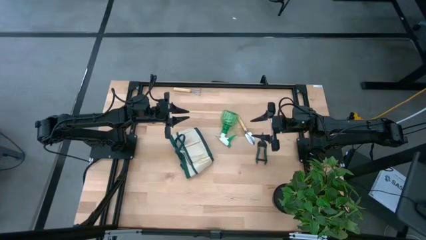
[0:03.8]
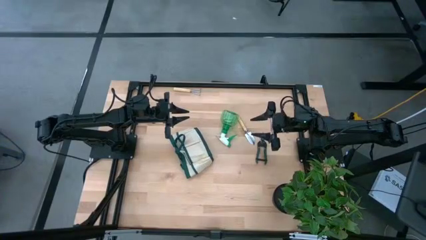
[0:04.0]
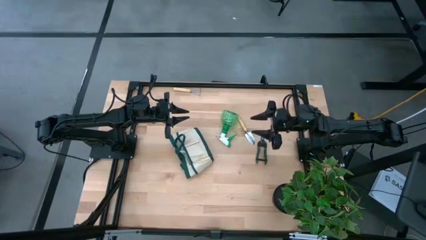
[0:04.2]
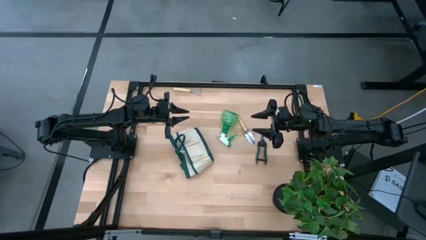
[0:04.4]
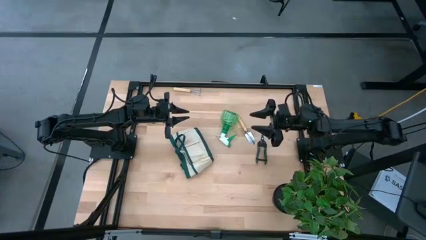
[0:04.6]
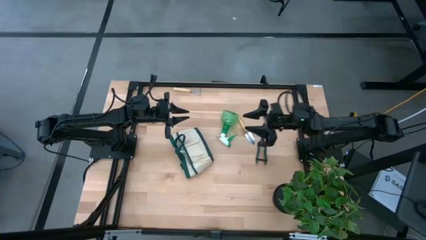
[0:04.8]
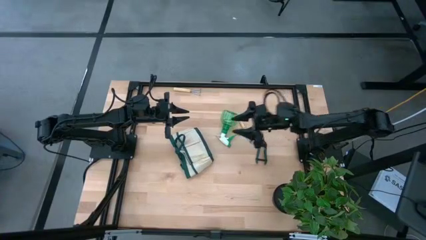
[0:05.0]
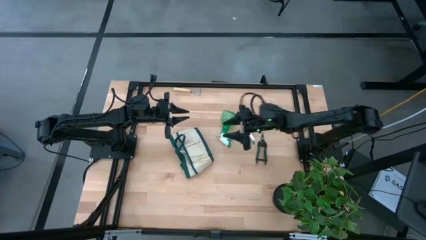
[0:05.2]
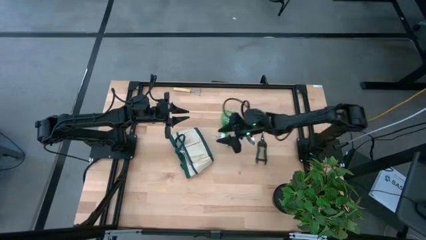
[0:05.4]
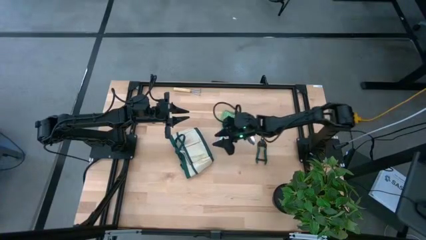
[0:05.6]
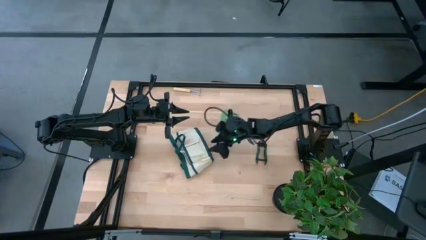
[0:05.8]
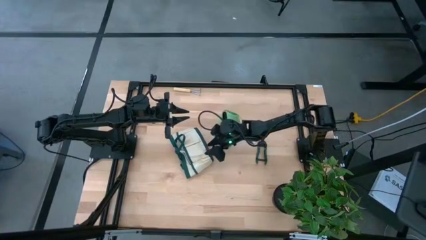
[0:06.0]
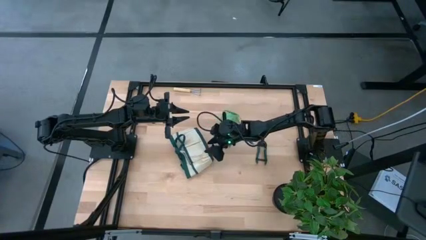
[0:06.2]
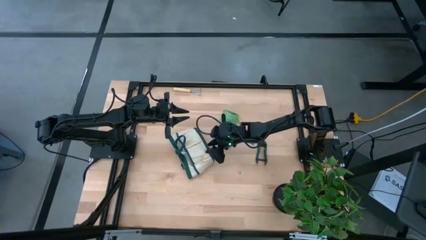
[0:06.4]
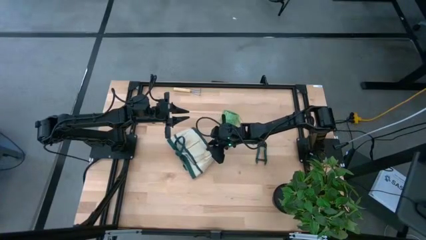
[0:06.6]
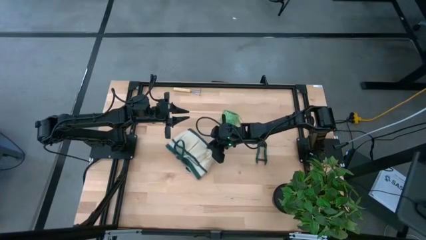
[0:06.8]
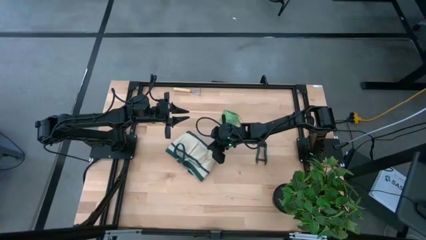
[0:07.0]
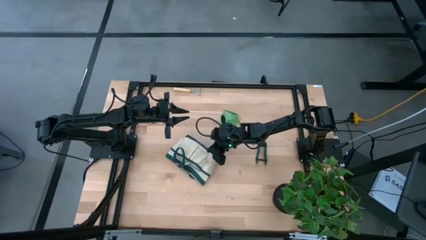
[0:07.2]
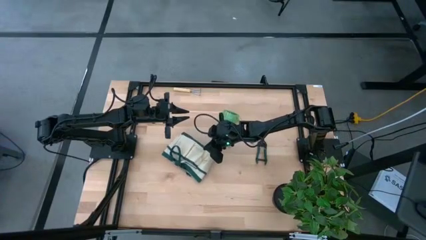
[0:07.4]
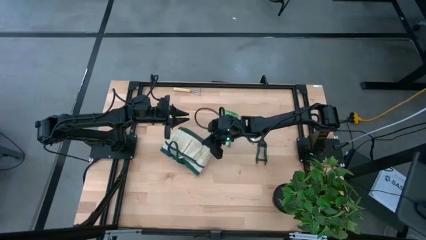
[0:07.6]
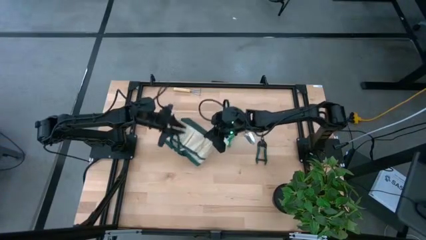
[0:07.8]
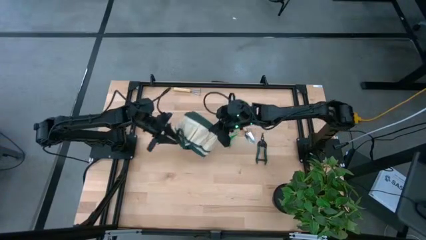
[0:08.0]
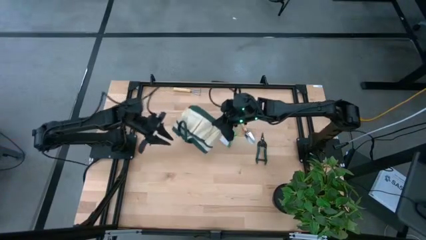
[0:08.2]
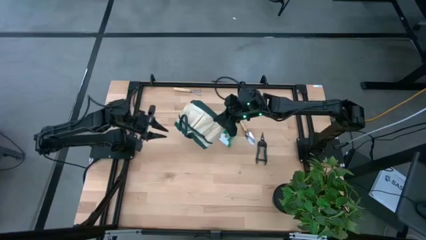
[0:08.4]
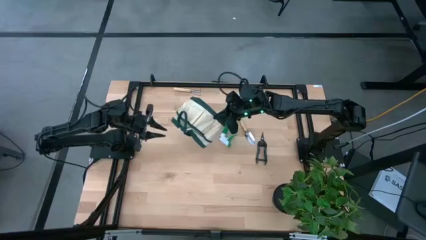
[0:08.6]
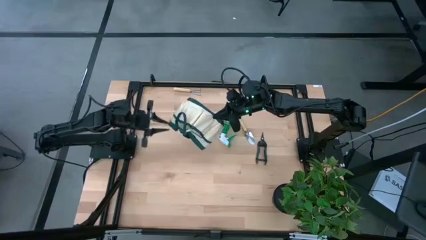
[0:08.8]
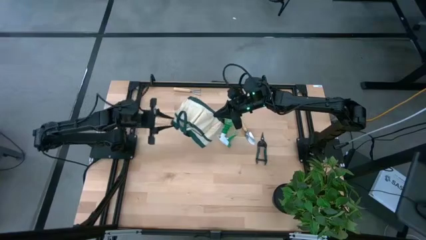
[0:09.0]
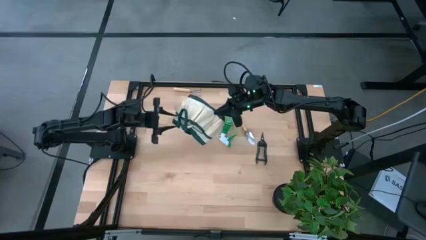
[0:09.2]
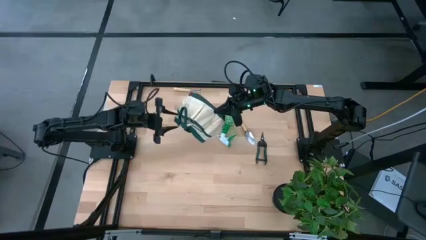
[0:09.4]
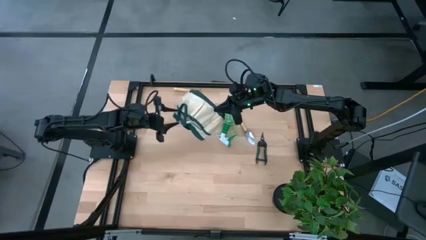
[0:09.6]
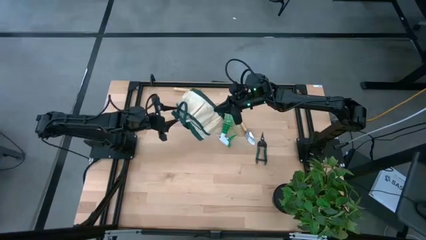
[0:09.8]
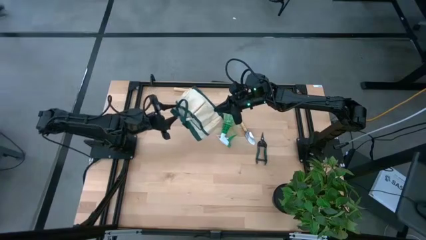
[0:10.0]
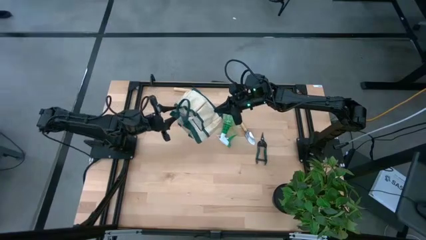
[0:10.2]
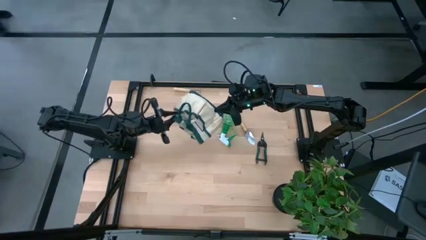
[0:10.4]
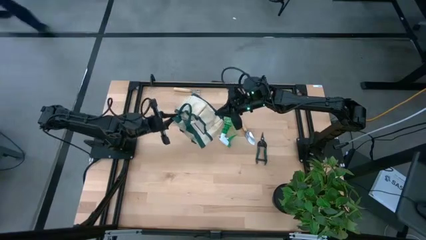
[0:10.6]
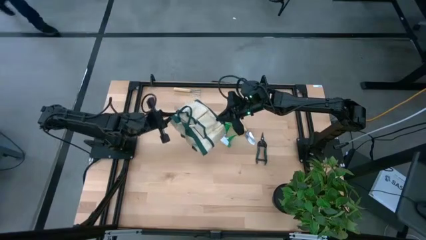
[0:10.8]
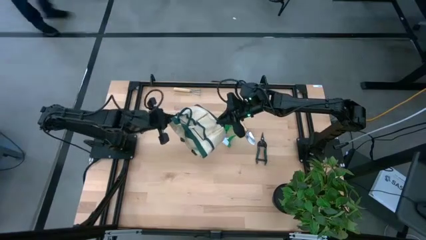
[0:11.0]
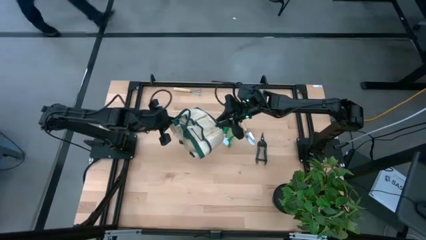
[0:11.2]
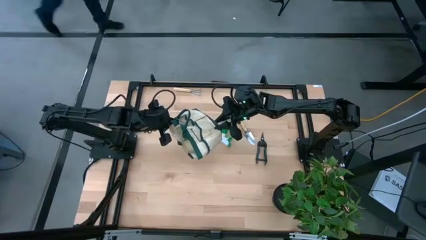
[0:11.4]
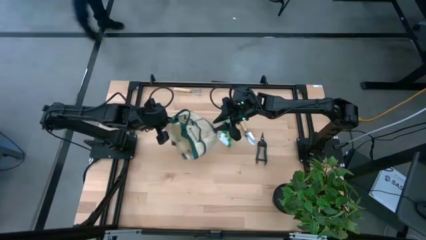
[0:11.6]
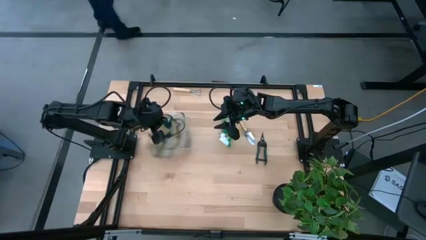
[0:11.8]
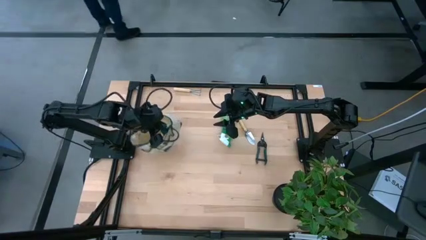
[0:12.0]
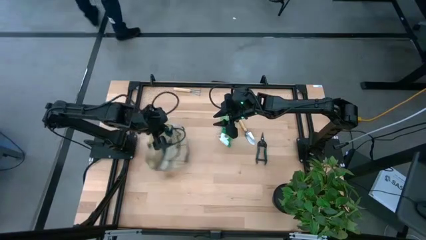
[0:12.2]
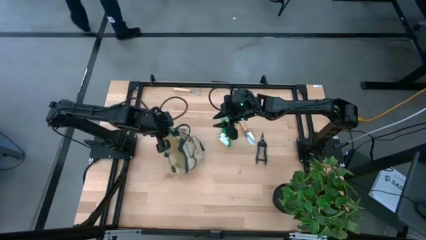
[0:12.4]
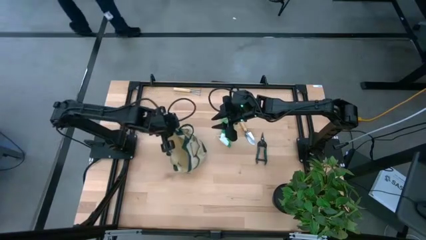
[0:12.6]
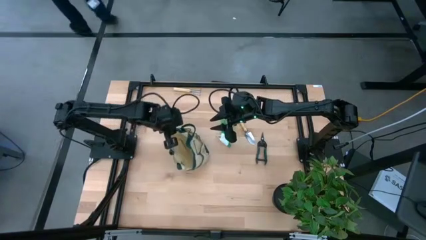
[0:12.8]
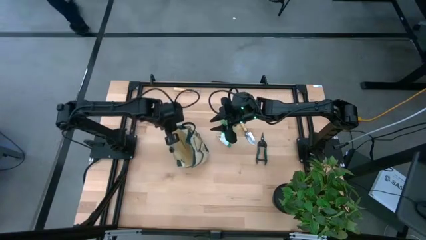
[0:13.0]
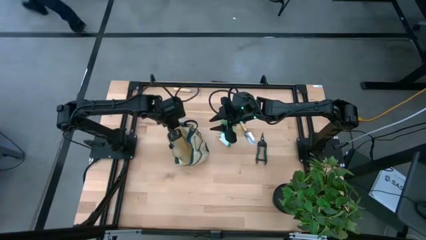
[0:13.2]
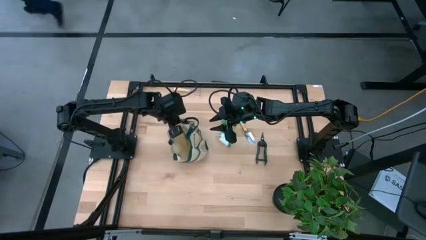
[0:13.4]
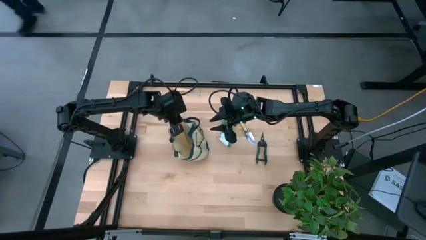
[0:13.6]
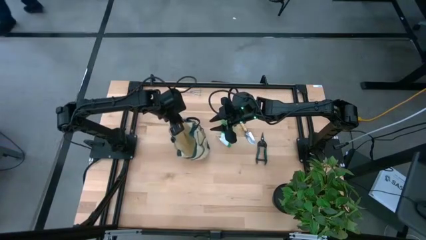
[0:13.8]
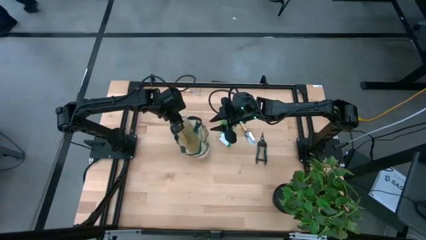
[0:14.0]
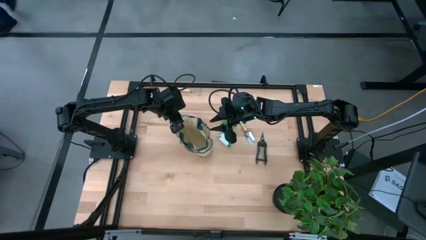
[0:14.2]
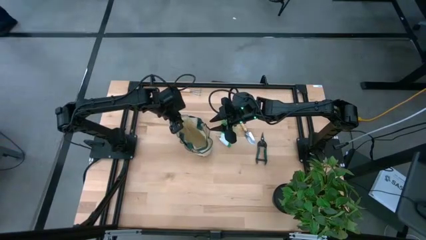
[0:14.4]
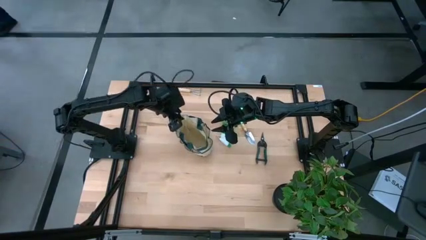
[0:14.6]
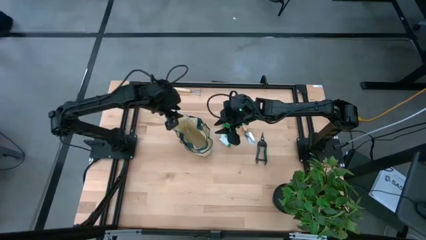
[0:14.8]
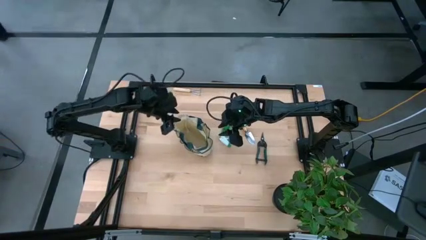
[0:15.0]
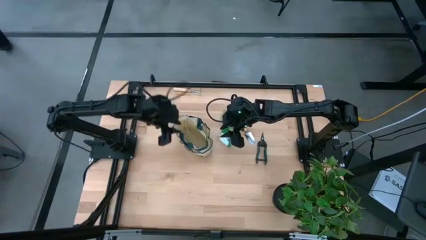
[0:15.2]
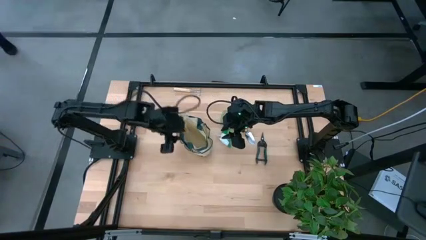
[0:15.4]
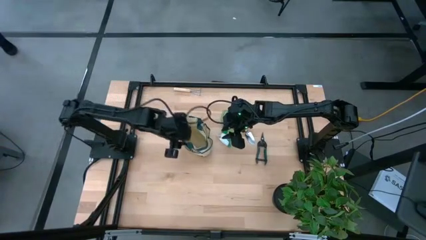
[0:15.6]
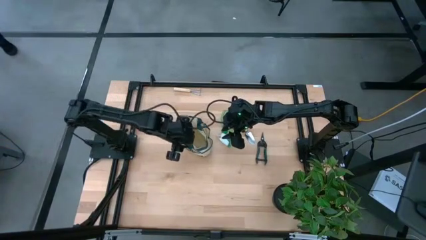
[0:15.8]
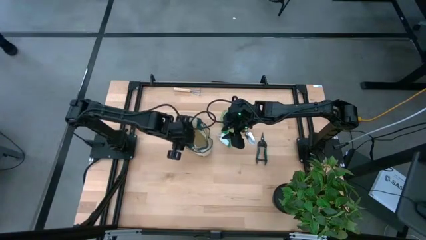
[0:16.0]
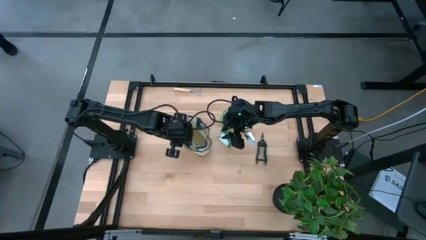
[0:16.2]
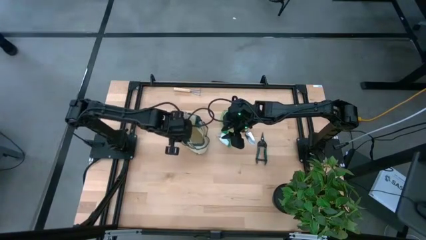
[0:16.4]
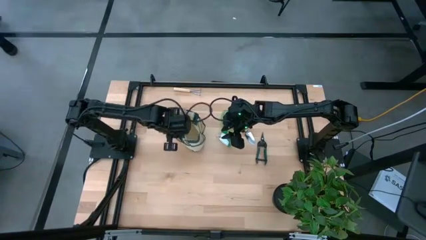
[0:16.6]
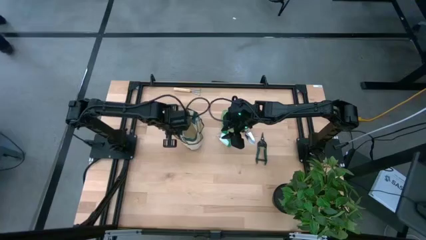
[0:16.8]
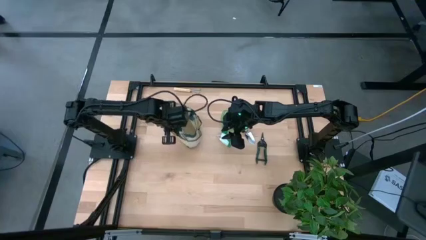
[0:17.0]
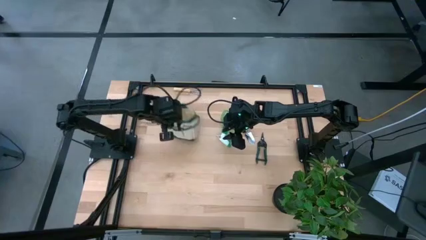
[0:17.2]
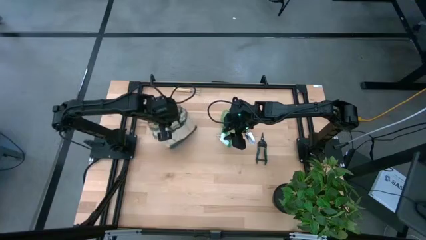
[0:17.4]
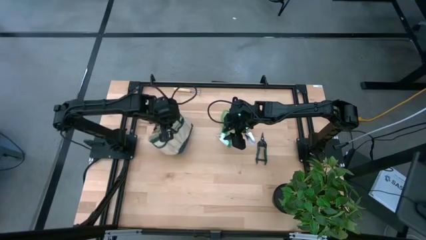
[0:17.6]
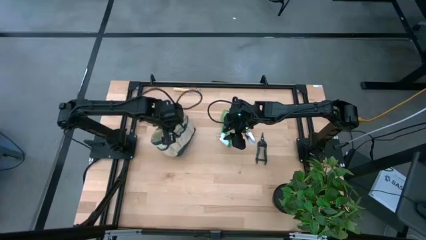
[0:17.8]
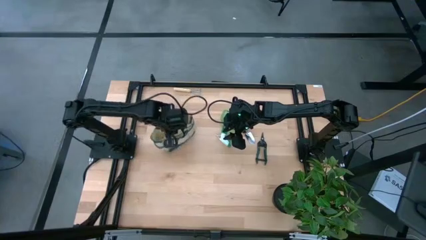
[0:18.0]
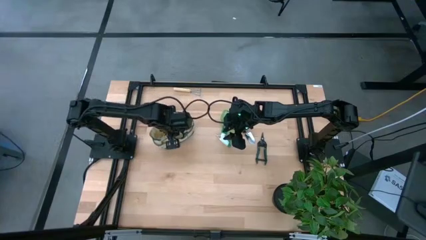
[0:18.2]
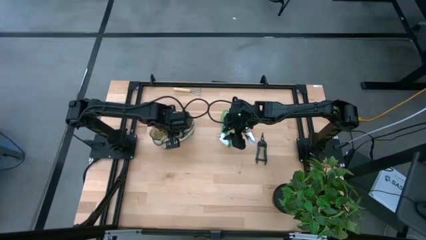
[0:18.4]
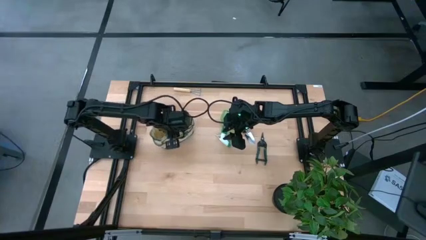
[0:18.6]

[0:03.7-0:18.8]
Task: Pick & Place Garden tools in Gardening bag
Adjust the gardening bag
